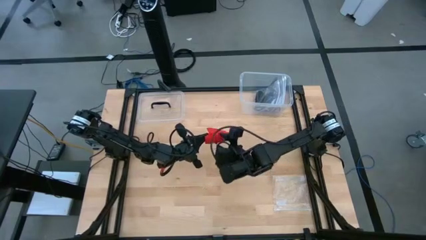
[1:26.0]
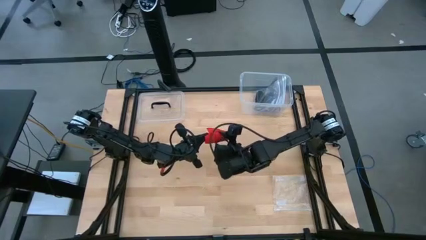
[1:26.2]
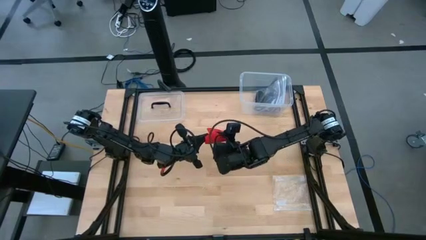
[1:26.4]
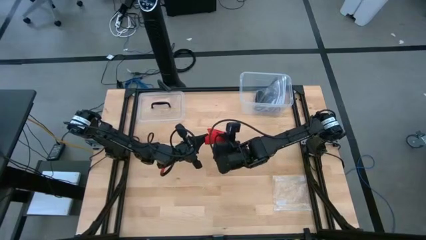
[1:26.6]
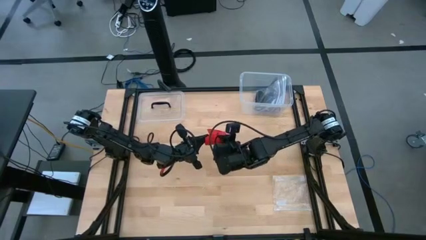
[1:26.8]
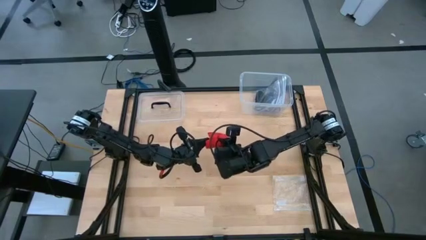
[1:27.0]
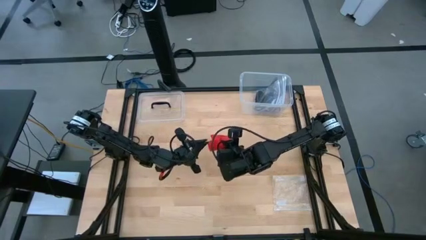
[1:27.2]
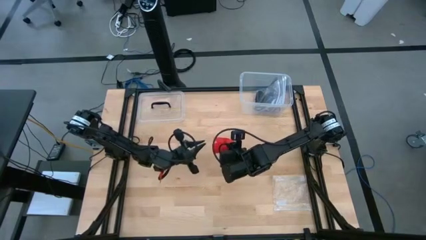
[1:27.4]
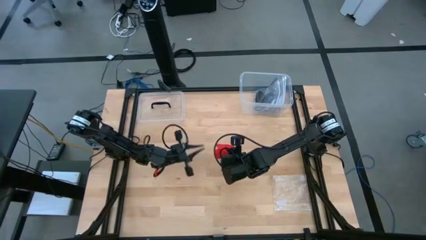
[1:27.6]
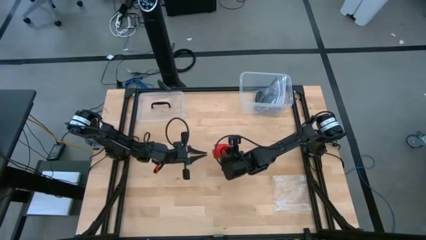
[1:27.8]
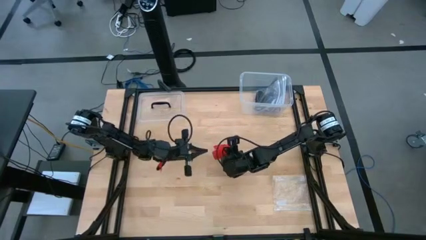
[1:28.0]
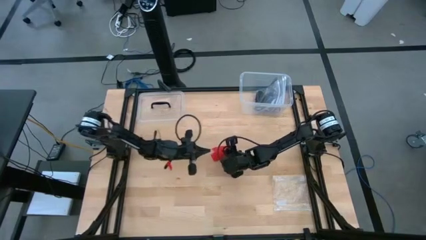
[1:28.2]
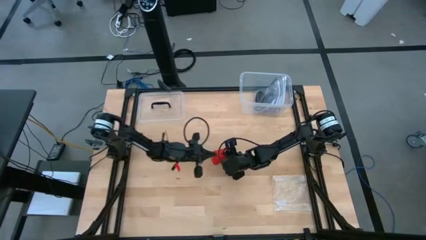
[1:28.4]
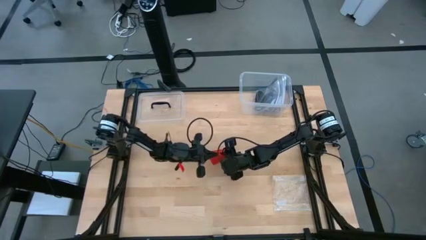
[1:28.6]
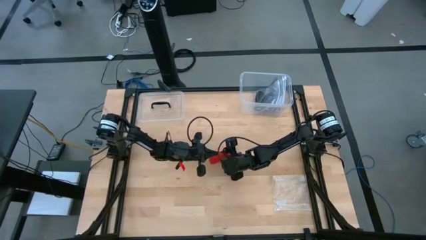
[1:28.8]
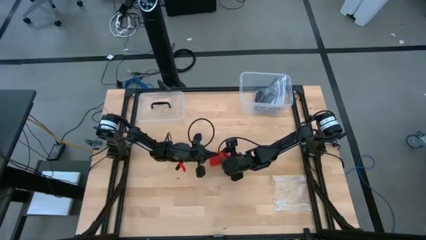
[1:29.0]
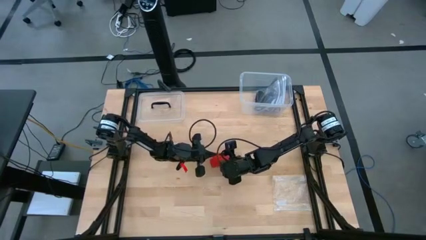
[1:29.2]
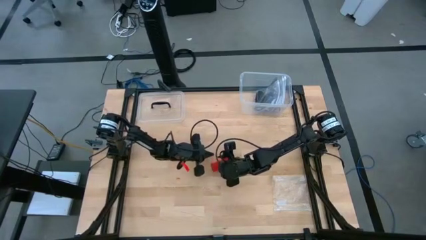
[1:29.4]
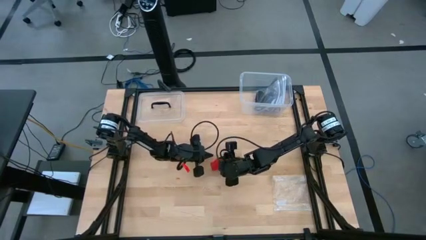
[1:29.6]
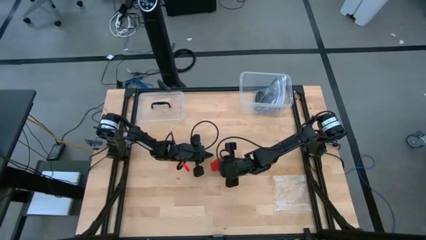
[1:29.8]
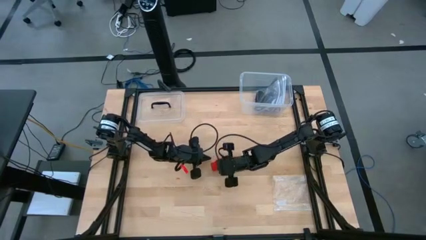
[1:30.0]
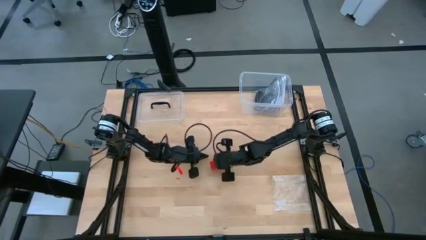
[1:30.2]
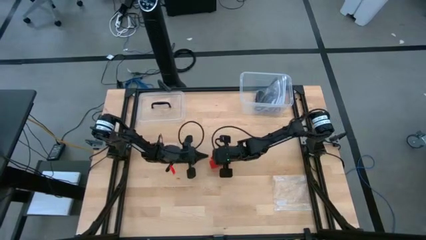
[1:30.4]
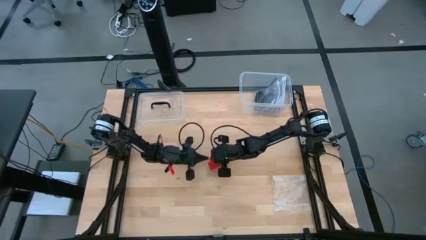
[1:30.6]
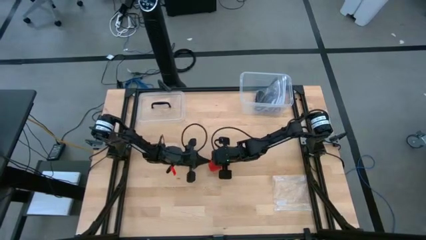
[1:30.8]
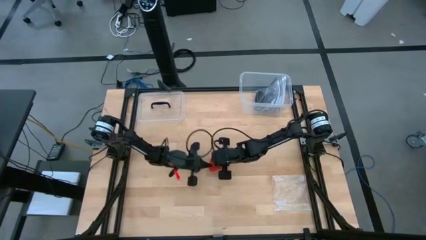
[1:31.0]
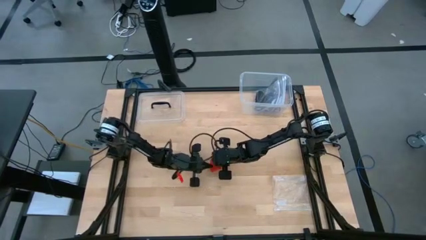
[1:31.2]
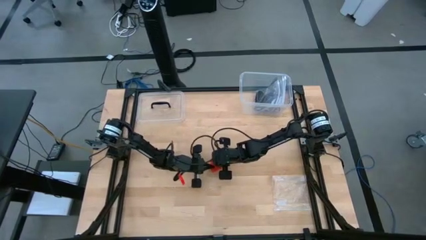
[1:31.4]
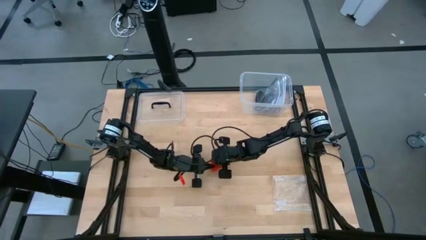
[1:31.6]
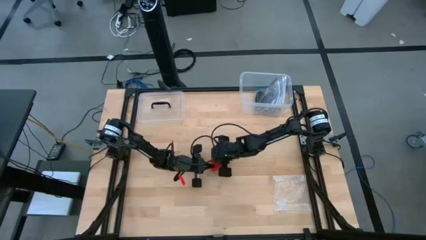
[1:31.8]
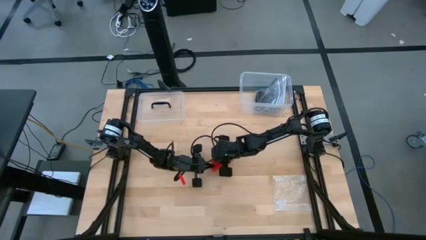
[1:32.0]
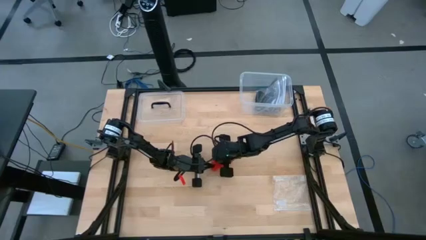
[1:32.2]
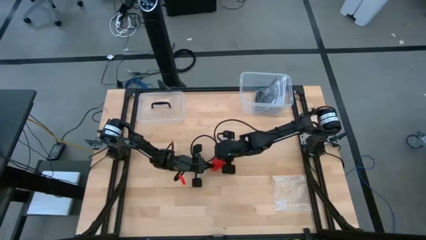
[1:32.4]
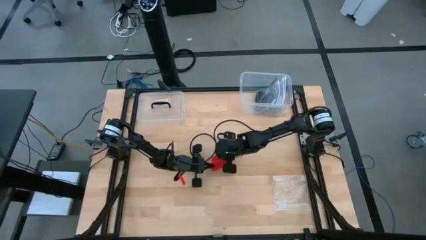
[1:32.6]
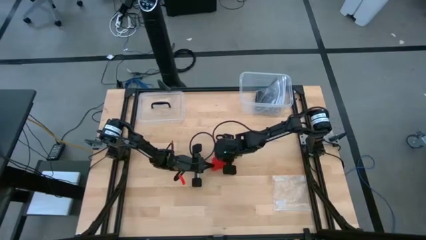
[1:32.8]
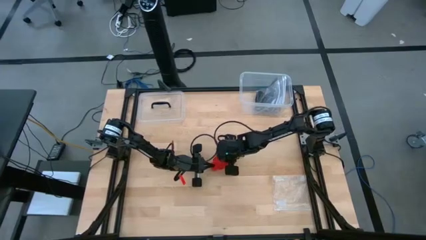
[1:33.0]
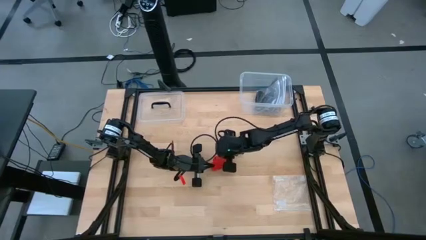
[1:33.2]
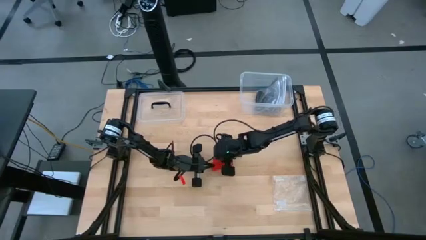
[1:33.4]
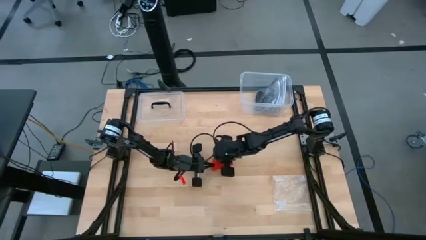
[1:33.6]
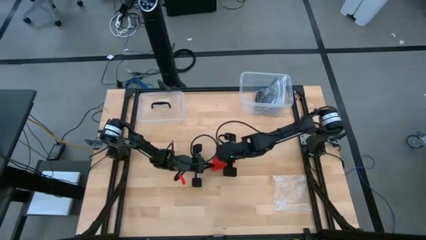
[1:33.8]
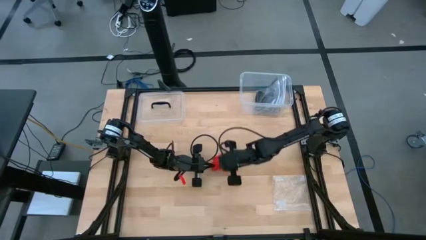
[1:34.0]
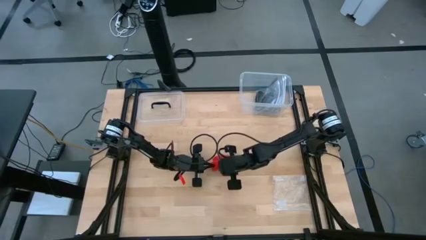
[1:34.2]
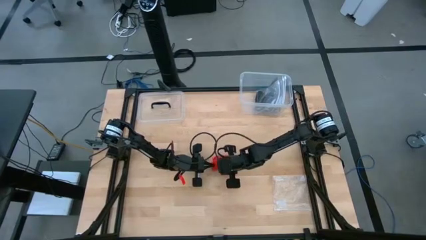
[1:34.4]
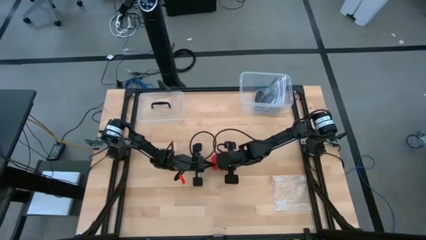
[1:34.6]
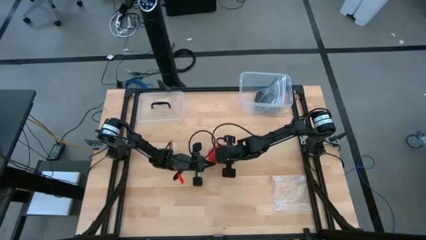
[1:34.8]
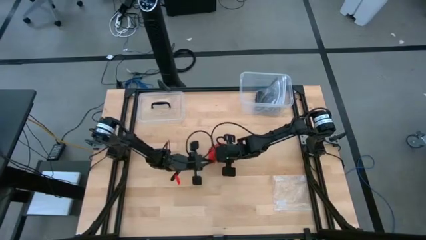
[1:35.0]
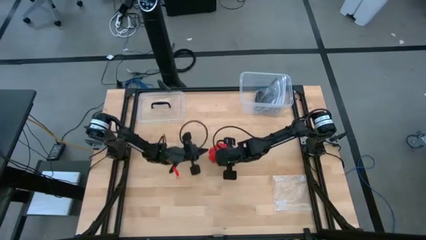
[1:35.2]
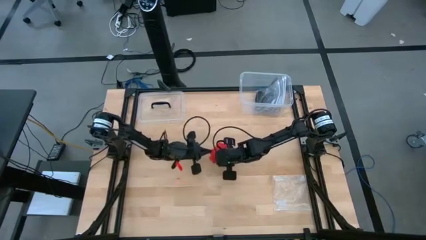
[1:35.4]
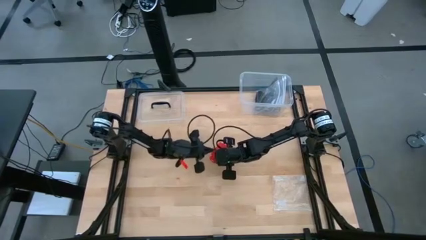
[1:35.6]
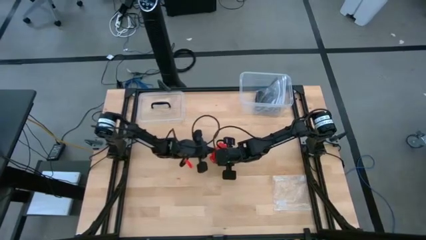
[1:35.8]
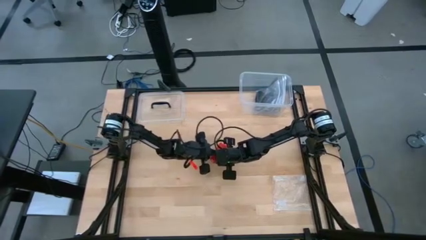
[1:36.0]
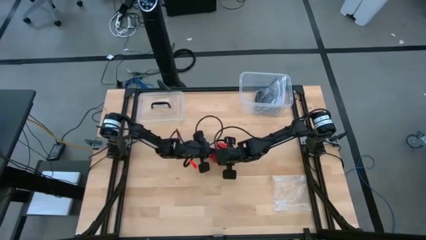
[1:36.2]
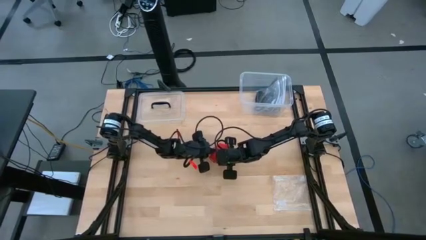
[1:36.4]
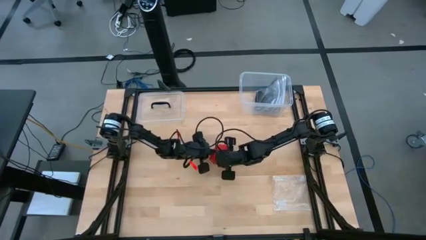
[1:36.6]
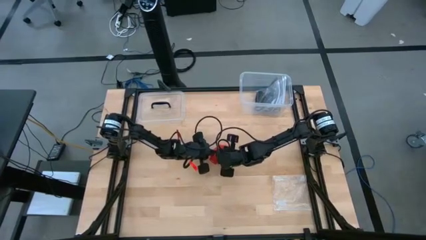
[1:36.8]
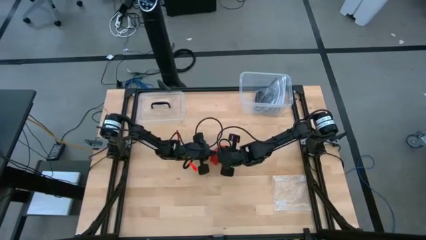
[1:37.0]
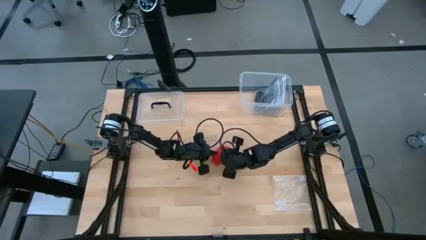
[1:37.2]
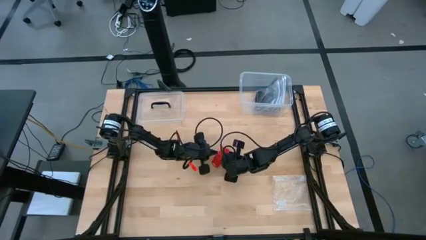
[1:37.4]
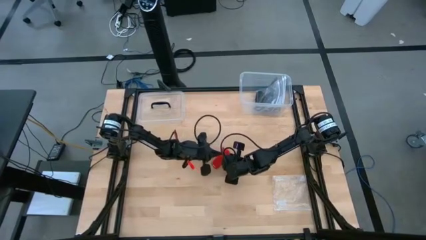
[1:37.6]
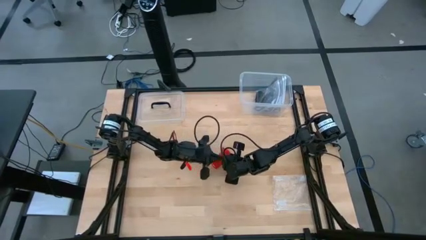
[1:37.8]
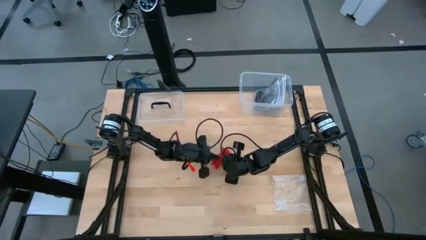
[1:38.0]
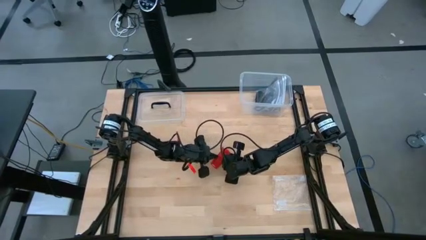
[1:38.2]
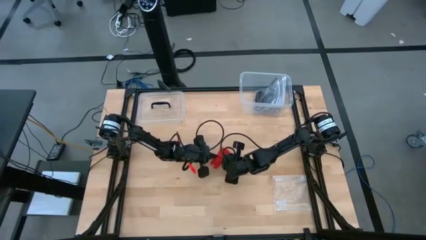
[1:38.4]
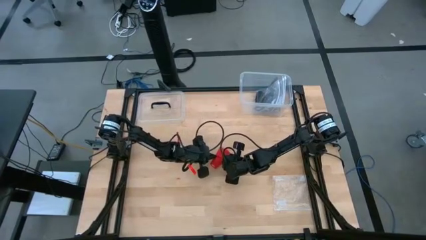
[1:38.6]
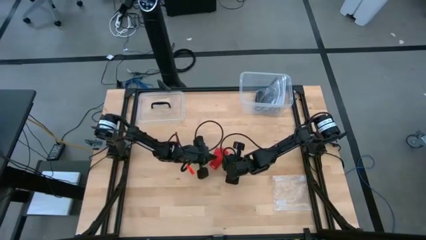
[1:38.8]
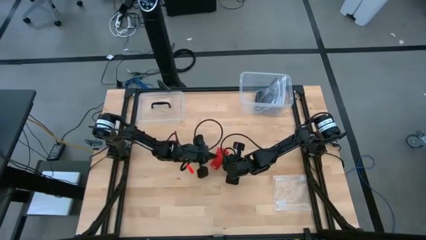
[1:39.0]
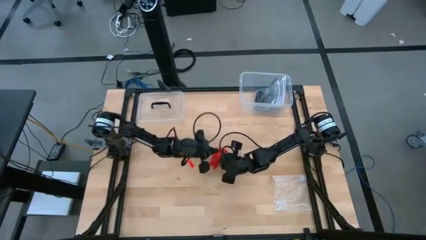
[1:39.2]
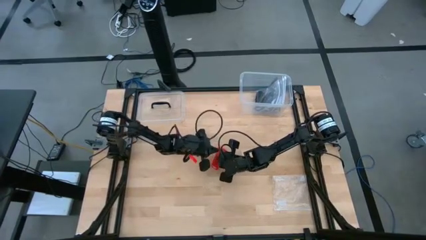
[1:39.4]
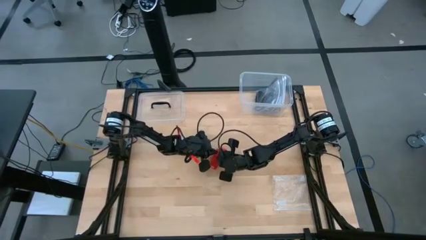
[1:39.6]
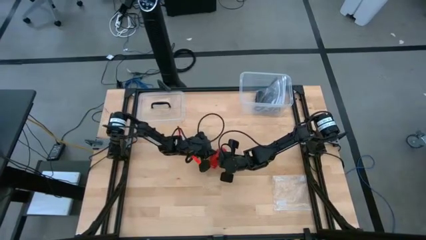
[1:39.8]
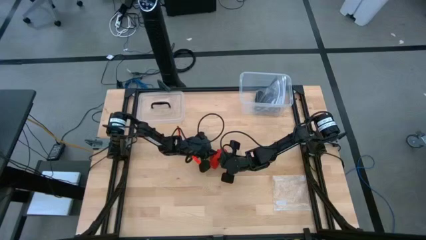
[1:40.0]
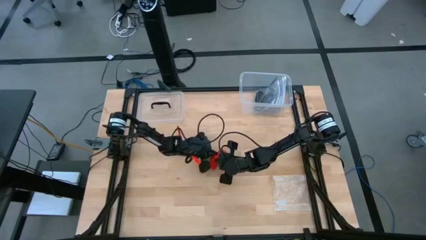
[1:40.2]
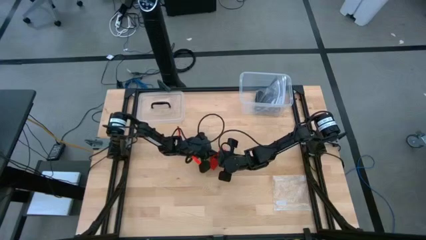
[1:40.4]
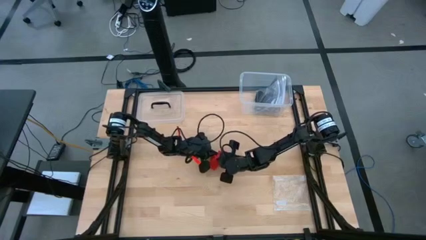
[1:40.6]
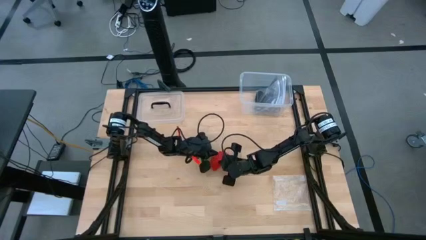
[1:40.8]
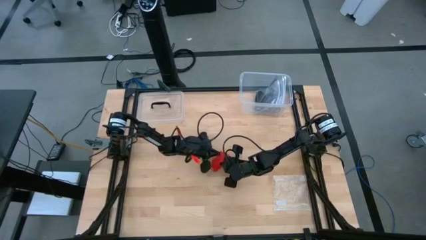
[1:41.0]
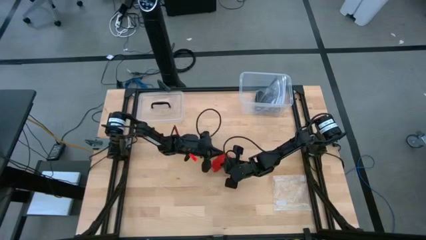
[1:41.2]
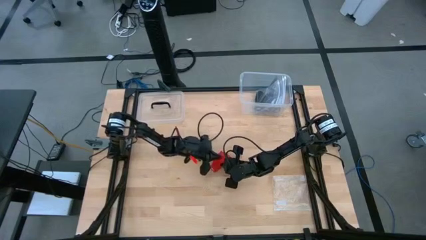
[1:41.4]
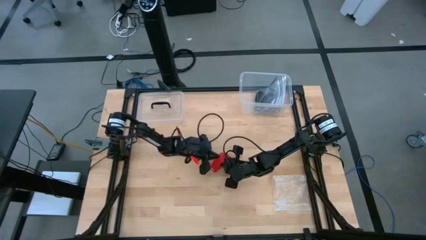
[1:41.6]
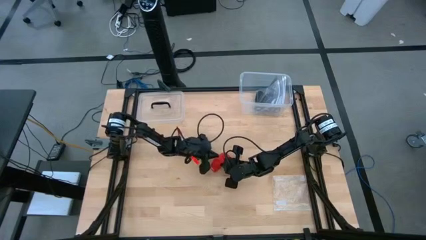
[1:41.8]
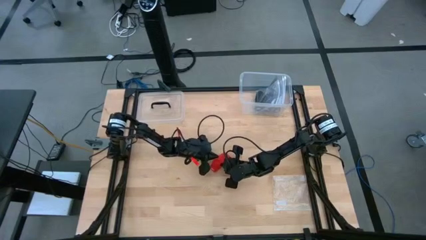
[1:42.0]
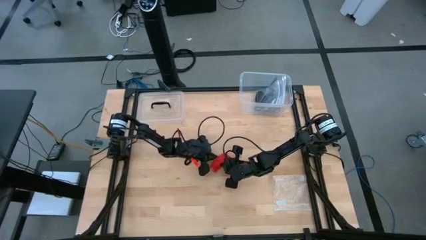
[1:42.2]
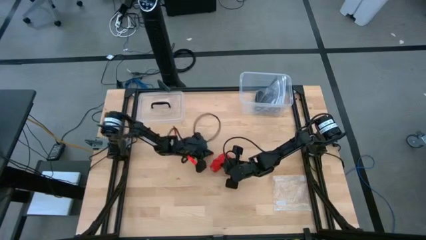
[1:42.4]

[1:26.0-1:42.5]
Task: Roll bandage
Roll the red bandage
